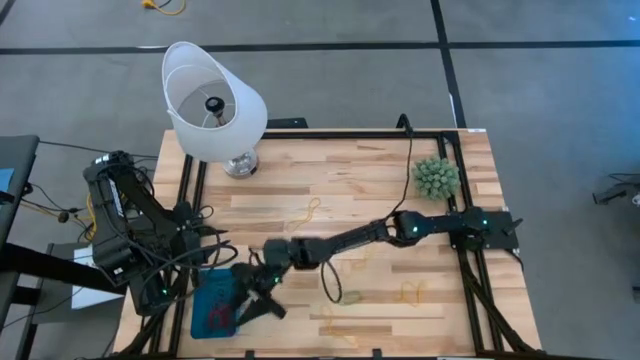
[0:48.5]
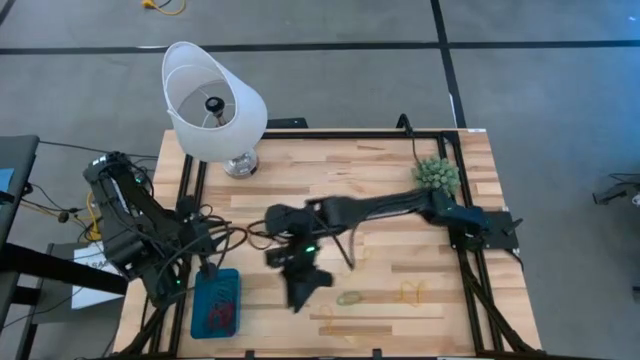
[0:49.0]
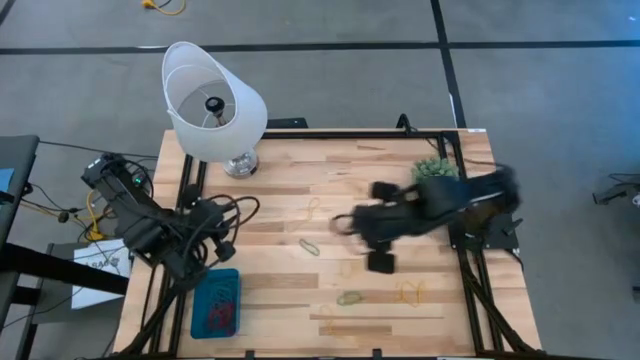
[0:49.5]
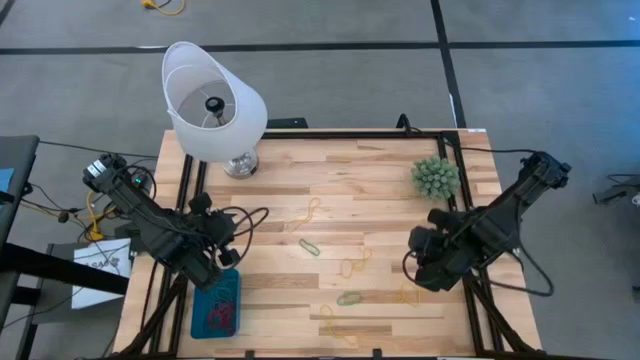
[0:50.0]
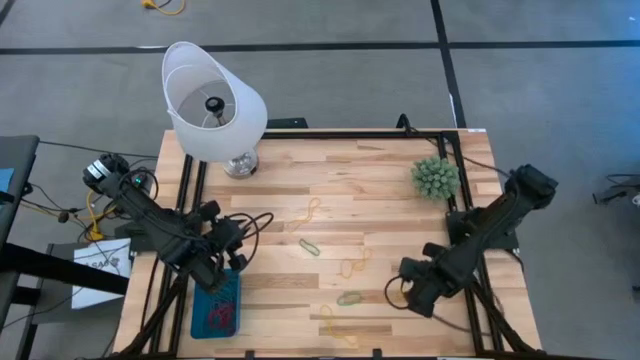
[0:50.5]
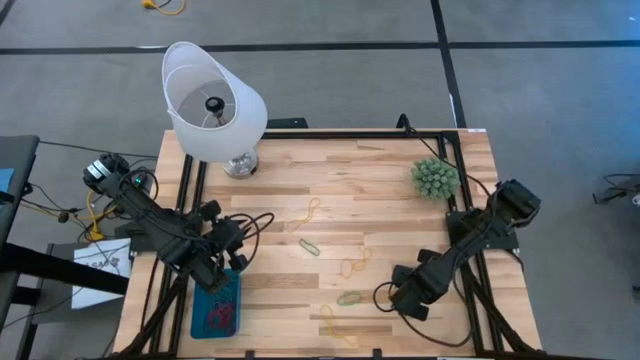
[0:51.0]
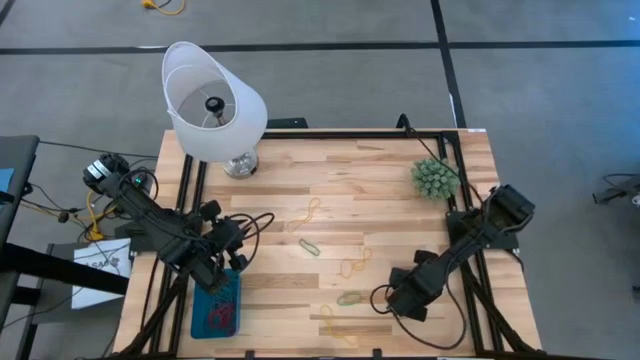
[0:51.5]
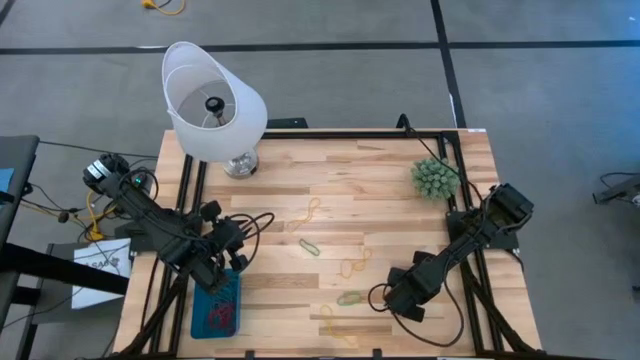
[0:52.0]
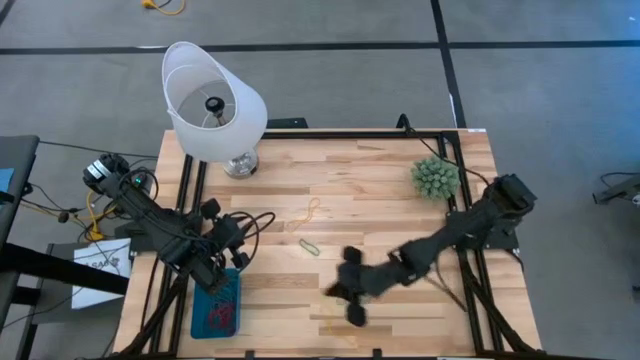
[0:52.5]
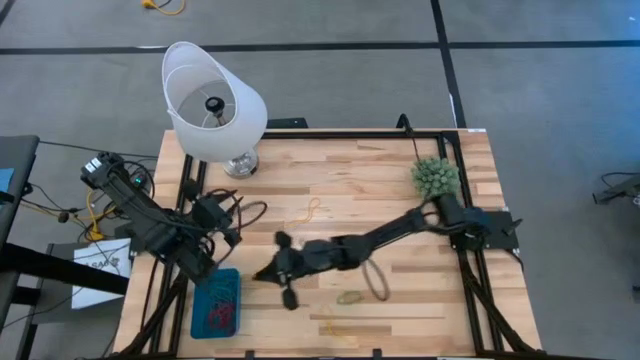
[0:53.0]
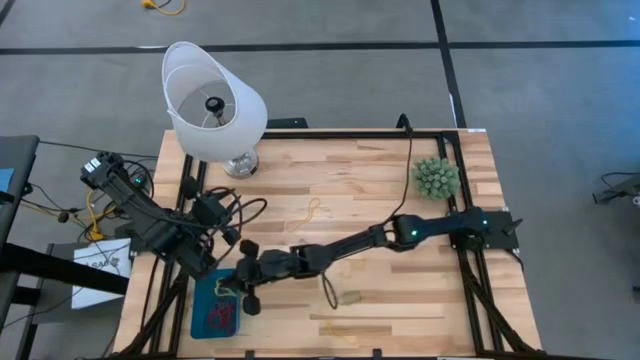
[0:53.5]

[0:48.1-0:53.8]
Task: Pick and place items into bin
Put the yellow rubber band into the blue bin

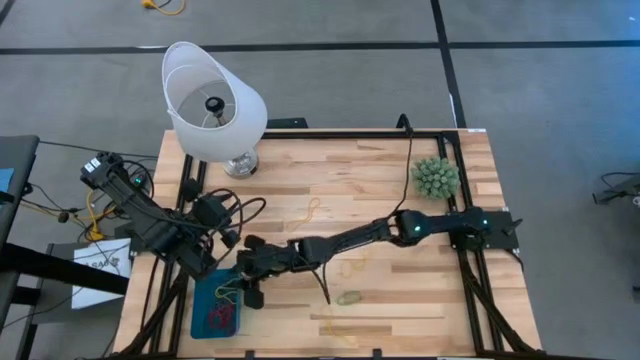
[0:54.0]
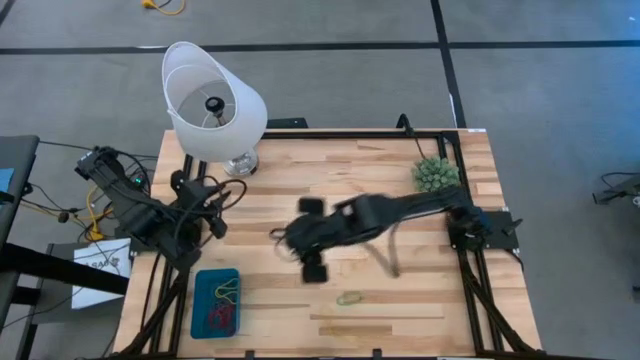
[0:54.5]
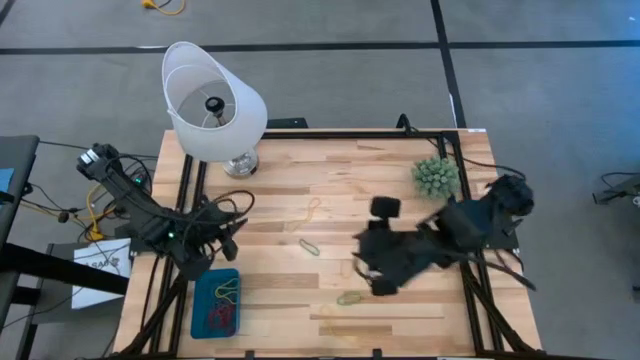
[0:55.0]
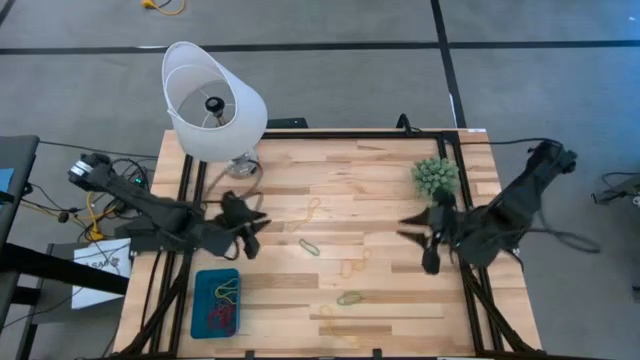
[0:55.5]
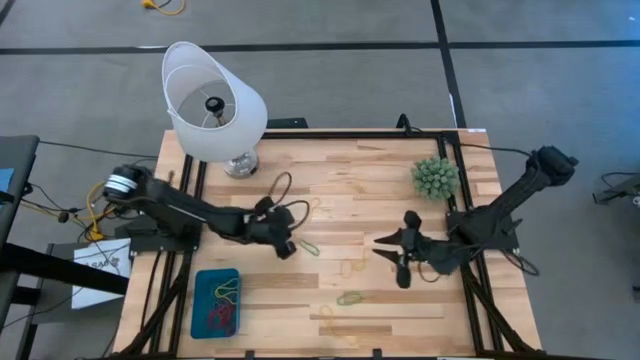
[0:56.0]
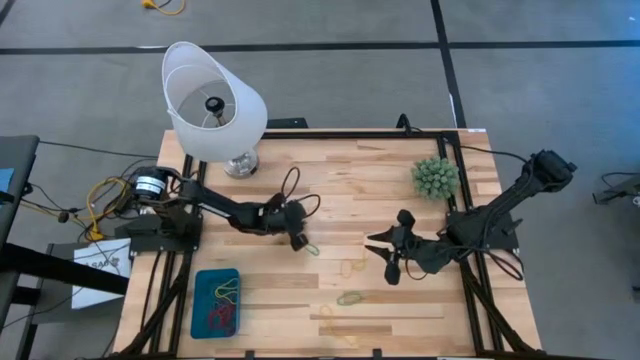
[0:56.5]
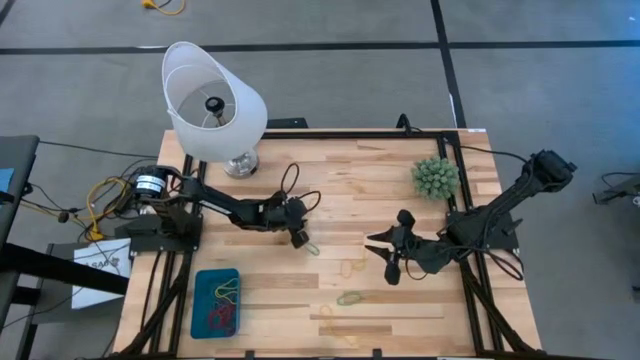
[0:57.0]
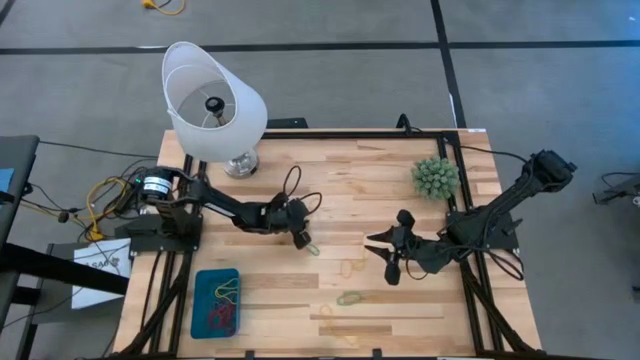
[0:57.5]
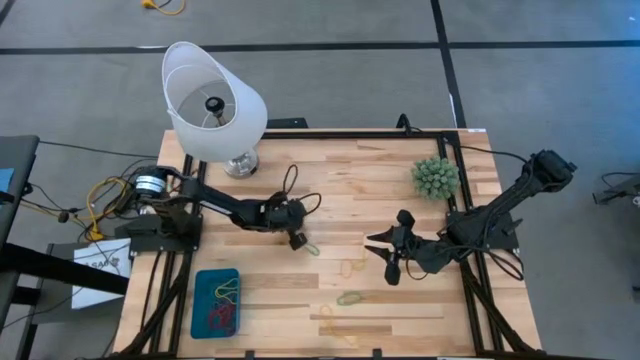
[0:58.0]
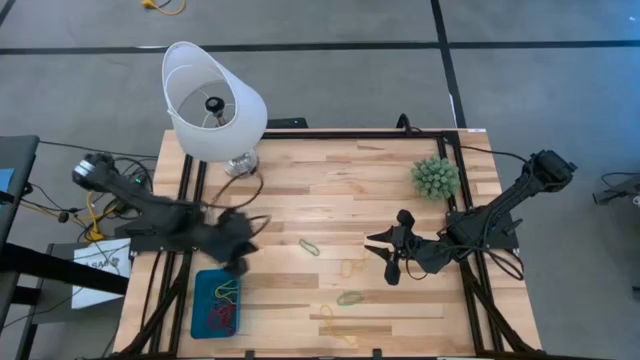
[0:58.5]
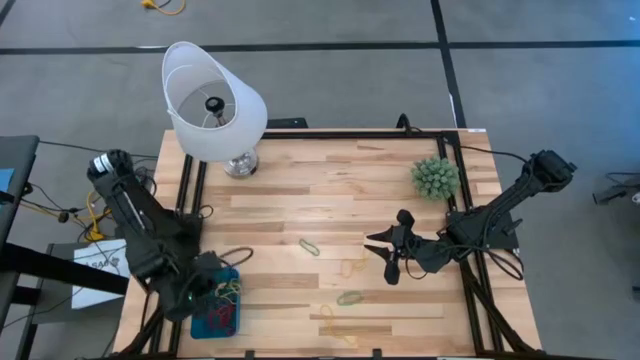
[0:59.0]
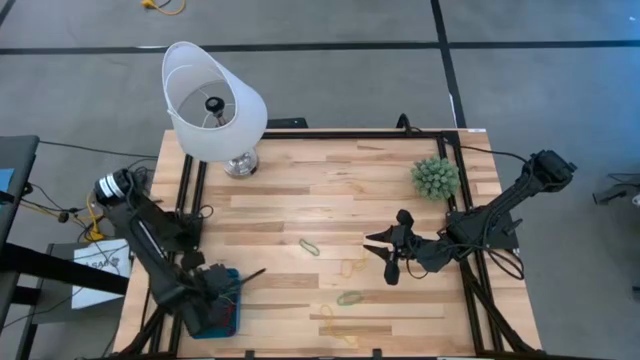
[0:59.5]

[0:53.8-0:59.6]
Put the yellow rubber band into the blue bin

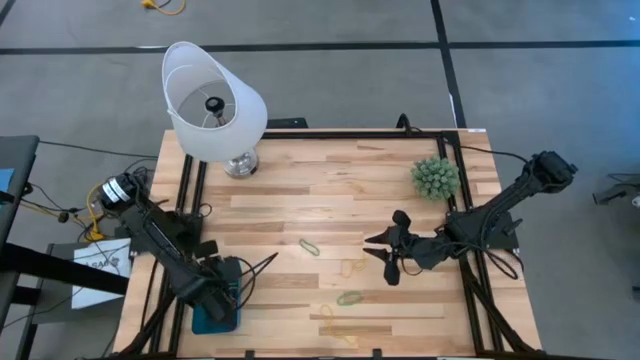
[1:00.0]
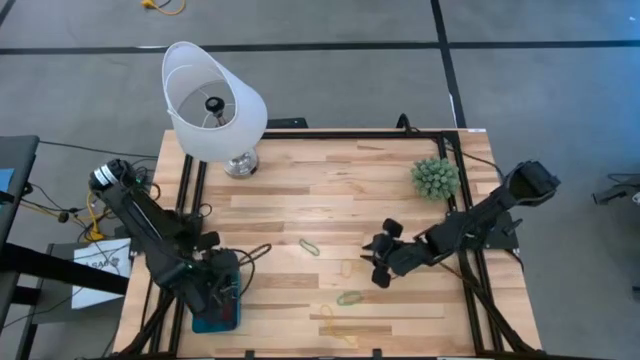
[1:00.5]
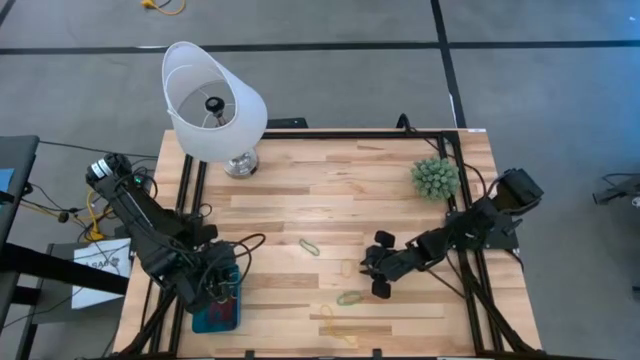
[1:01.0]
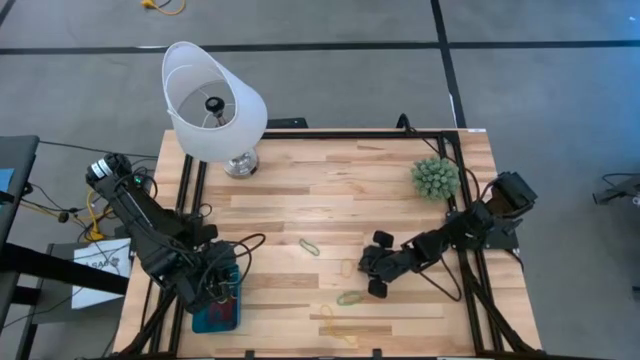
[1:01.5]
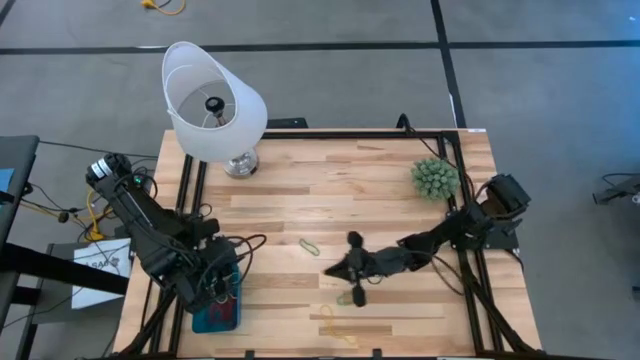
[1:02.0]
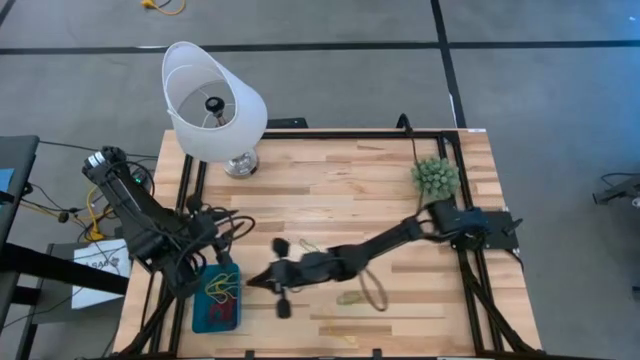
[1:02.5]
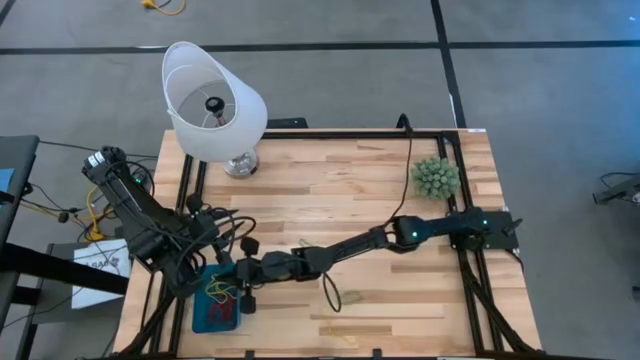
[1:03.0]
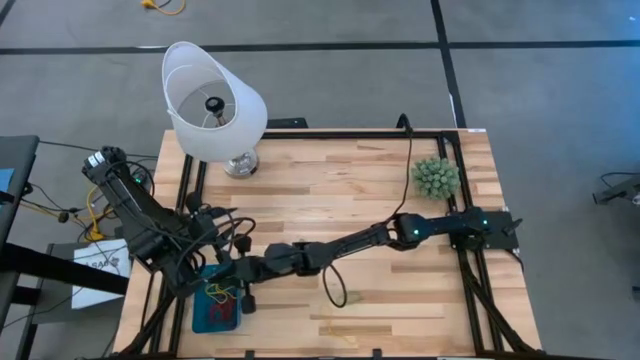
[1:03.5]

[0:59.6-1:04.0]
Put the yellow rubber band into the blue bin

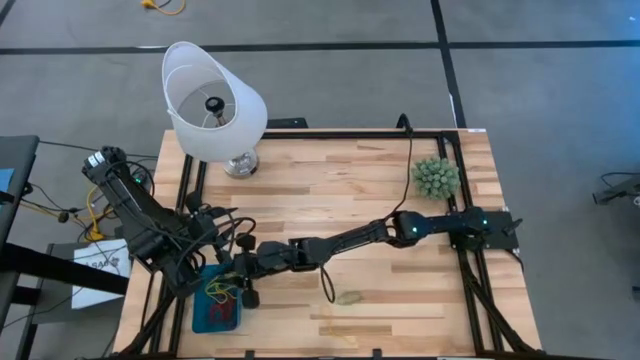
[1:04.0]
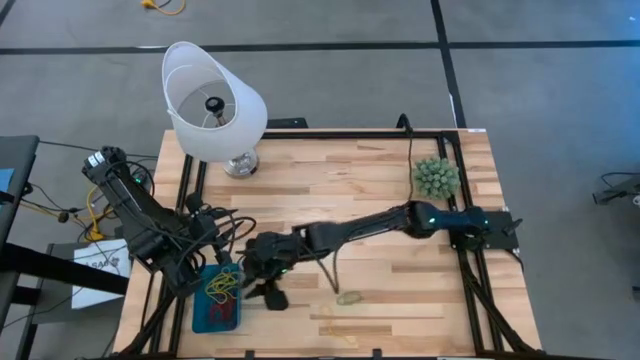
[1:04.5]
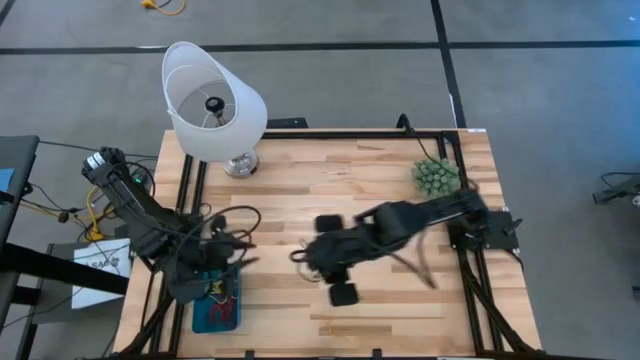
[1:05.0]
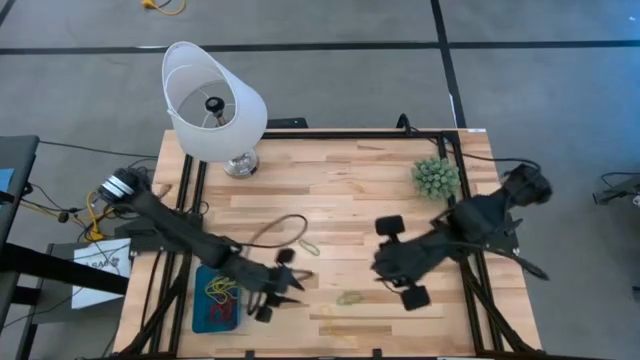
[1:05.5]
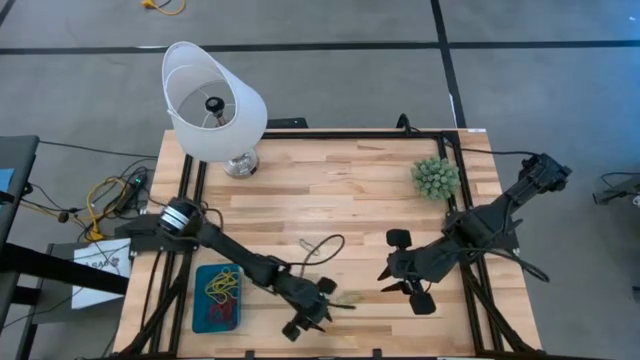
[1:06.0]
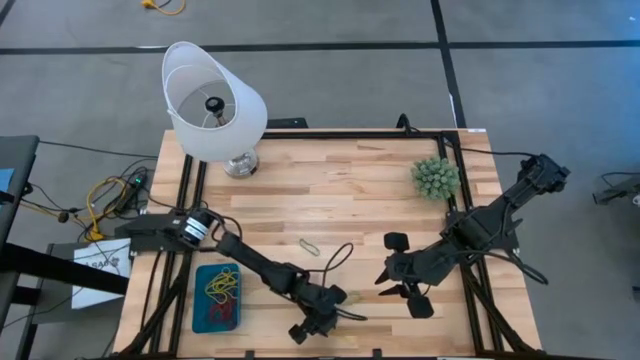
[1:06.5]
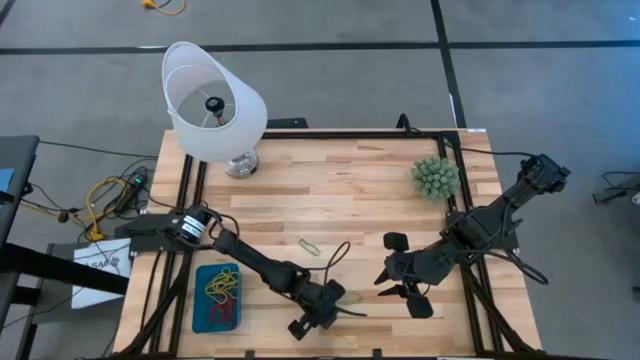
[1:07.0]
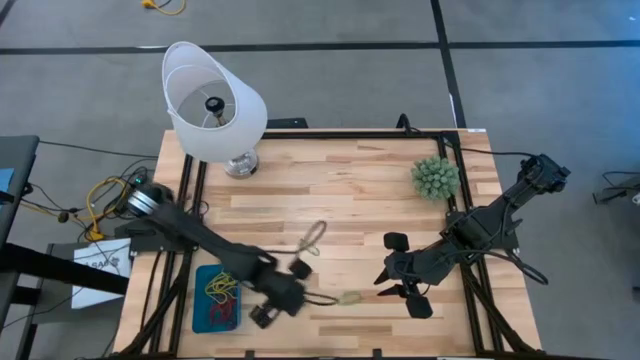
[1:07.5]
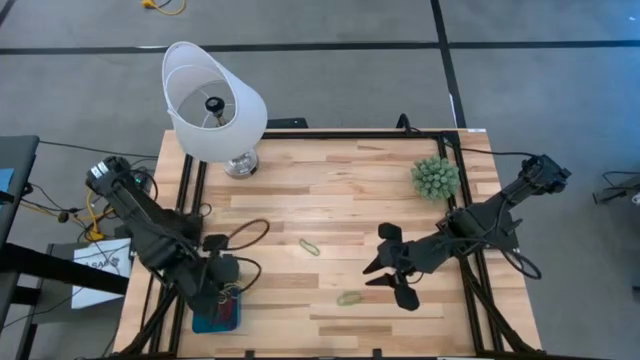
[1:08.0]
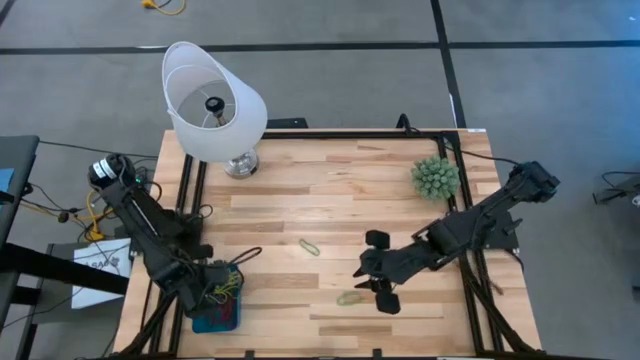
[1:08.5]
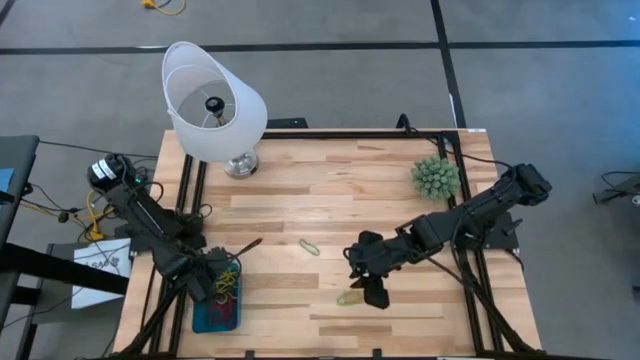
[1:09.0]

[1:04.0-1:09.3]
Put the yellow rubber band into the blue bin
